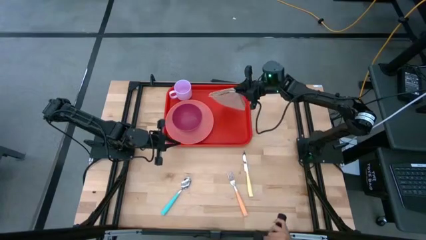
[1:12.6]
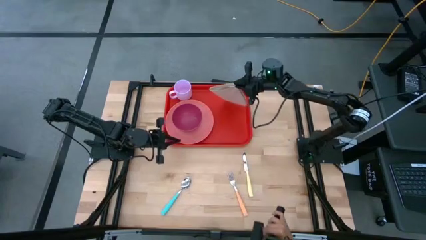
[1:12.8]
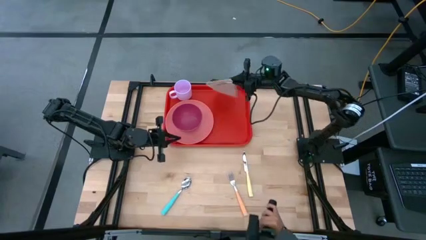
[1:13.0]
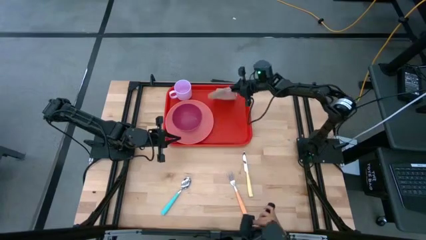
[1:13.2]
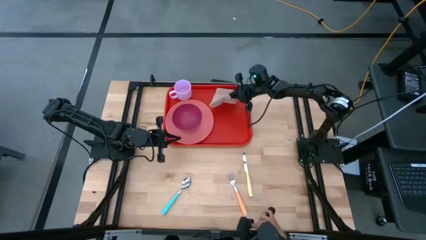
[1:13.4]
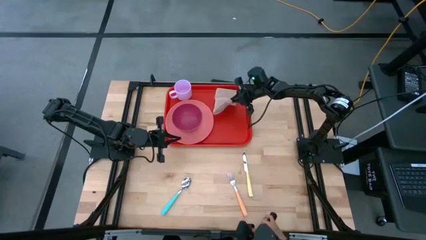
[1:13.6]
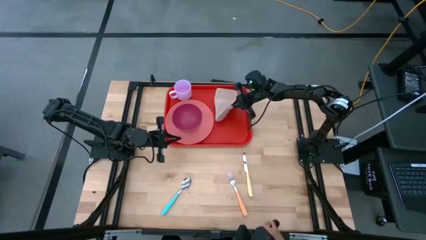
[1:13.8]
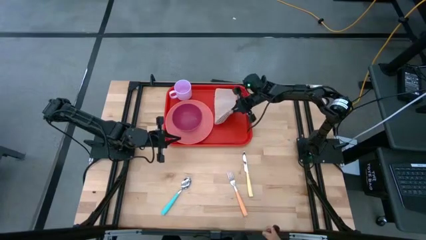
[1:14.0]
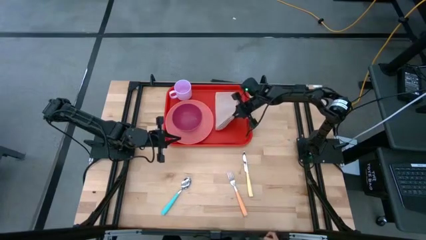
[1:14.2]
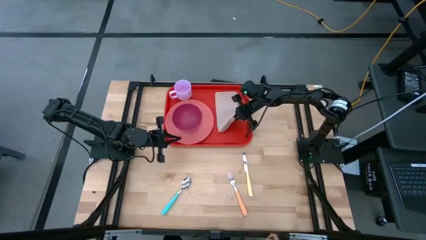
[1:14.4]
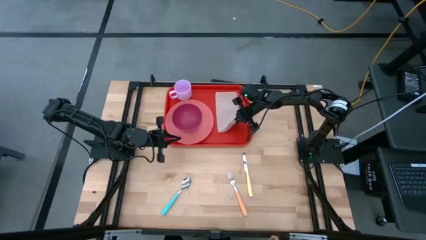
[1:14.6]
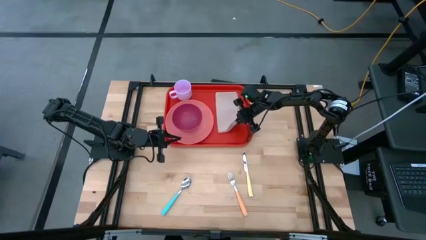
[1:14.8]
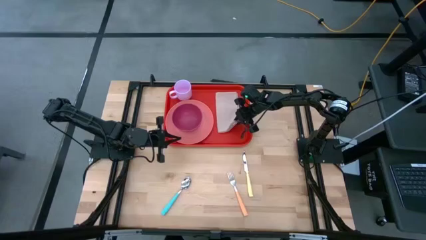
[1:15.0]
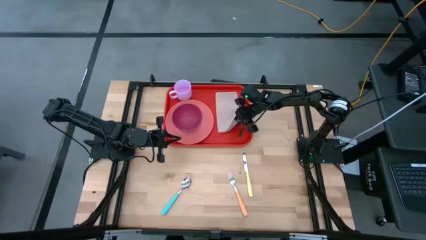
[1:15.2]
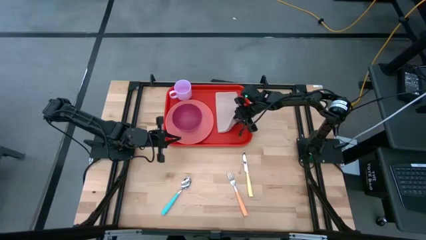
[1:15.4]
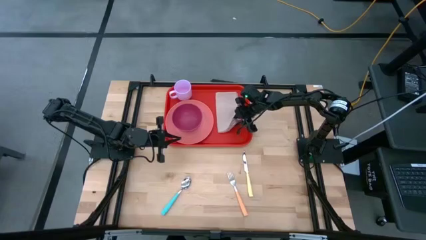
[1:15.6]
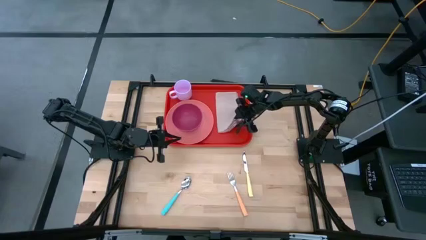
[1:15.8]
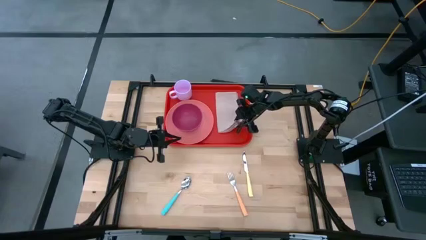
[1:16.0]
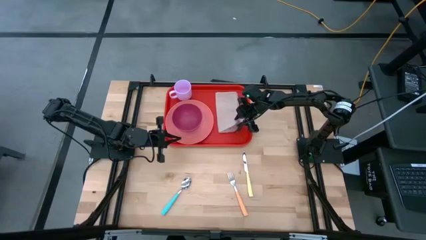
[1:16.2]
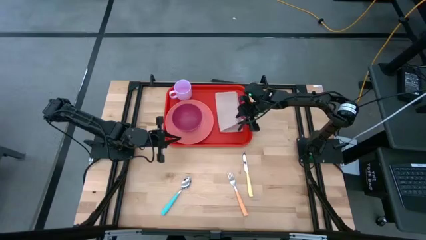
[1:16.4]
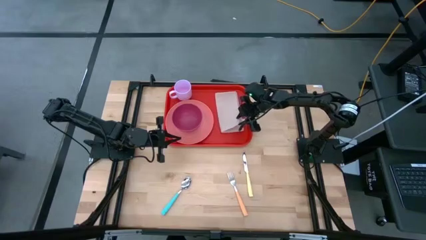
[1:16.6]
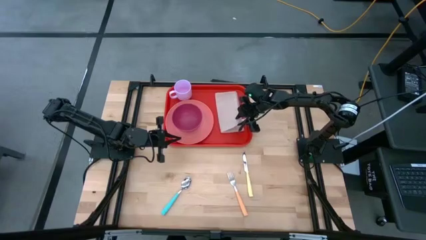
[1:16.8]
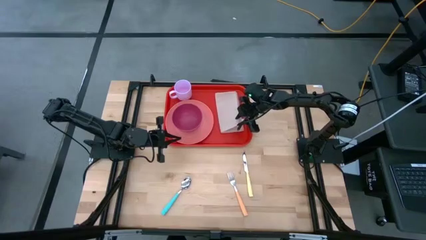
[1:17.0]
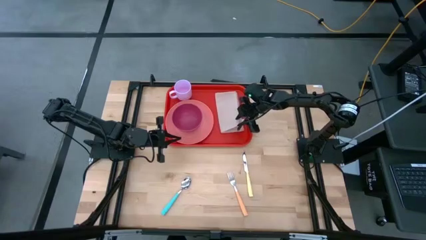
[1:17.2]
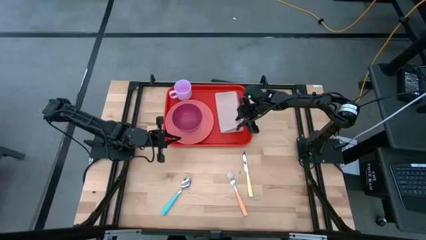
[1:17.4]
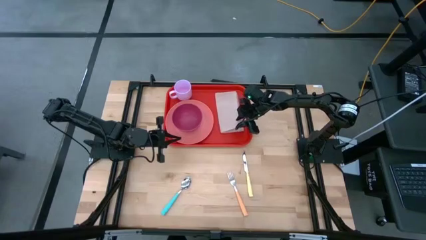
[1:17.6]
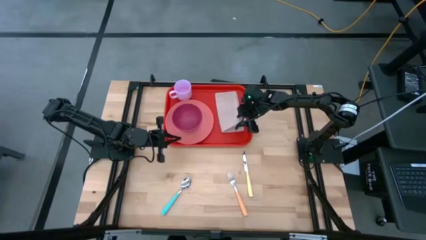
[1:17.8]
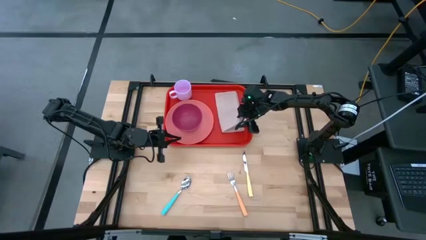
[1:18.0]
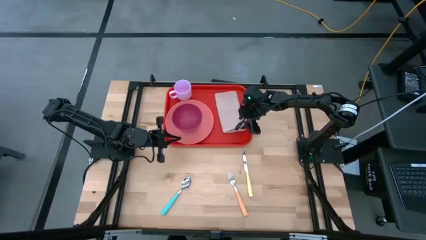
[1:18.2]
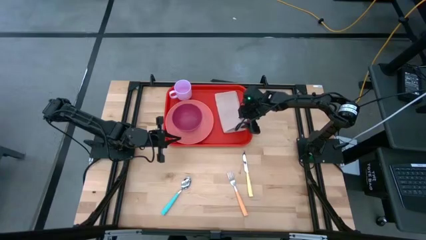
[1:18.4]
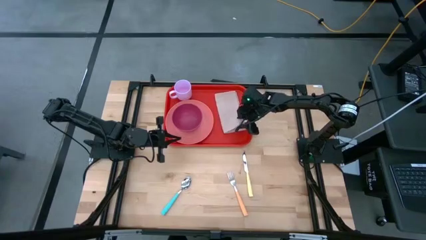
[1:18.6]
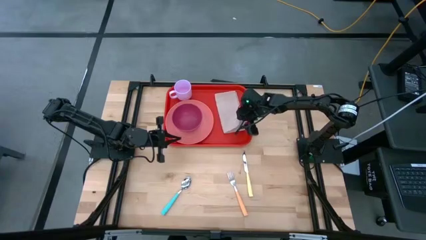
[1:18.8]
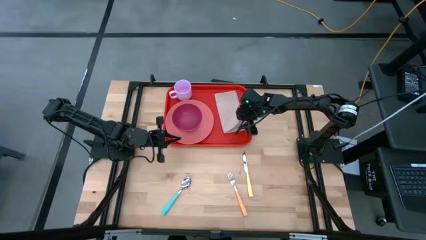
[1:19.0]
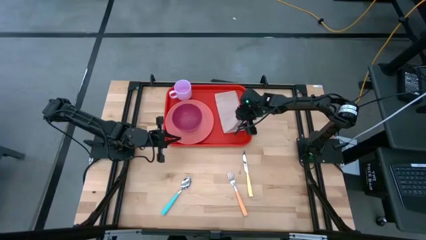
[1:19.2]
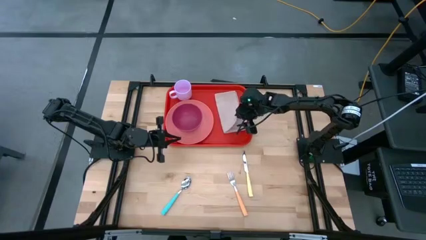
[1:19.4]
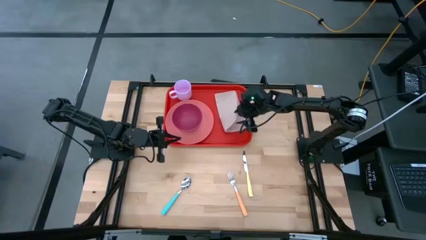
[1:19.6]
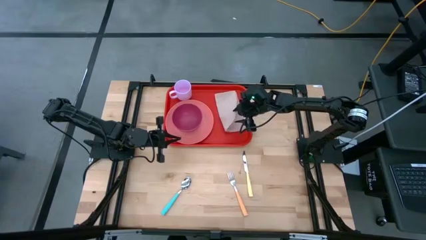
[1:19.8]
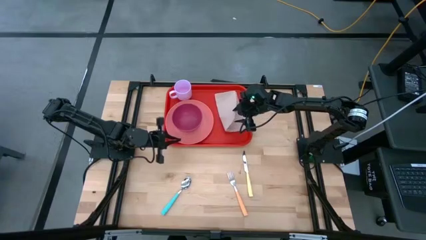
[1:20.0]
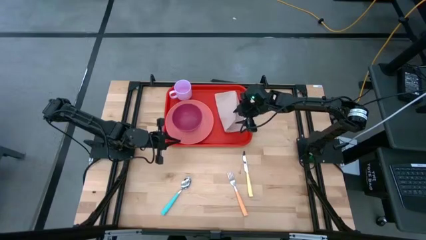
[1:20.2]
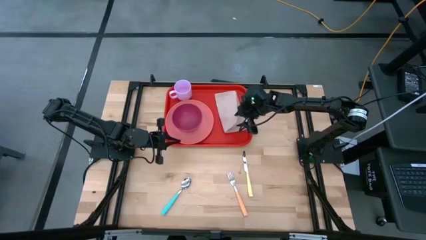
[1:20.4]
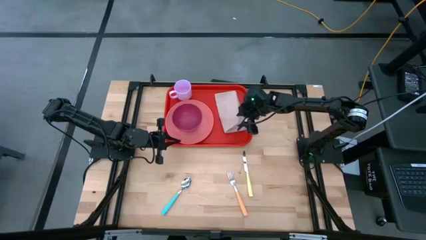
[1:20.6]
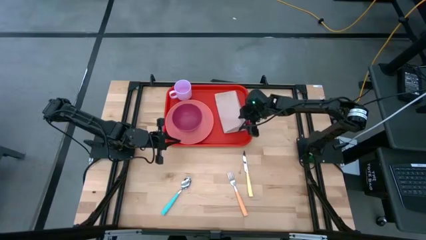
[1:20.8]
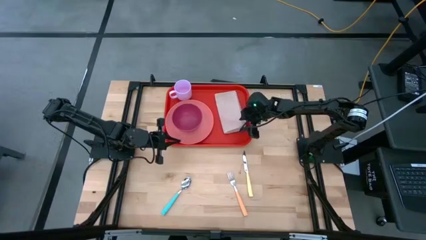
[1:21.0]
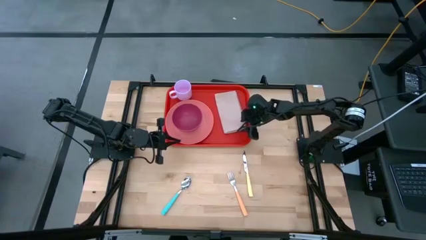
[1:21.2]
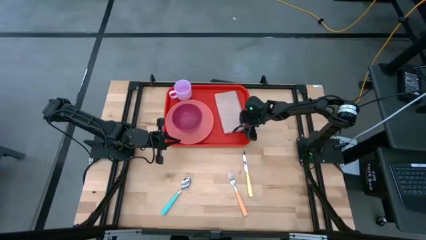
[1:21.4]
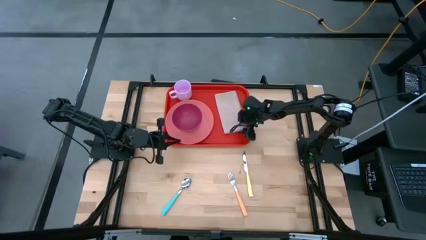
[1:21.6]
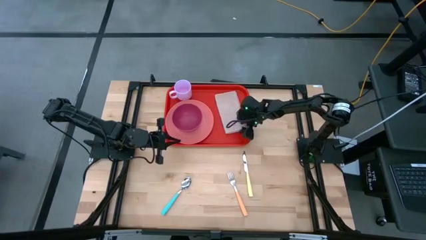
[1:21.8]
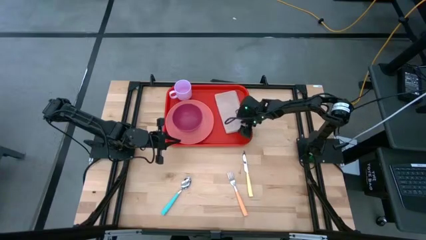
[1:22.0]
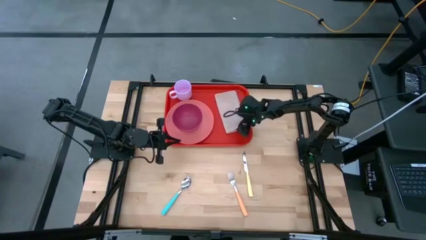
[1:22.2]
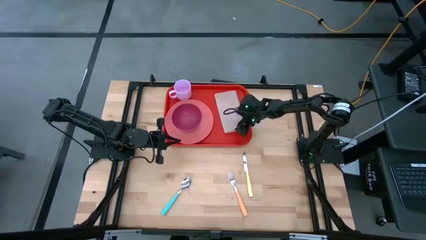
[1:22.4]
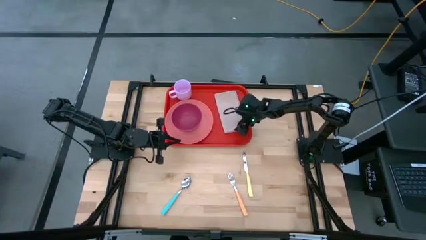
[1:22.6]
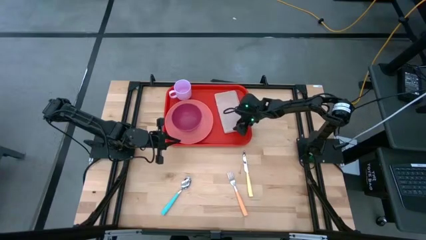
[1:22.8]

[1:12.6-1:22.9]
Task: Set up tray
Put the white table napkin on top of the orange serving tray to the right of the light orange plate

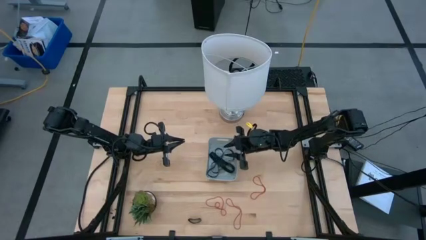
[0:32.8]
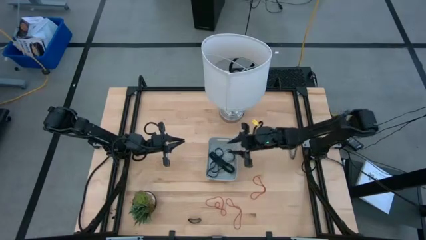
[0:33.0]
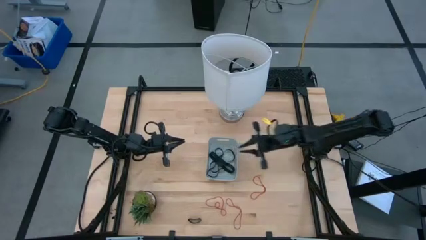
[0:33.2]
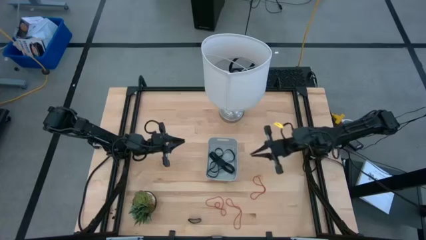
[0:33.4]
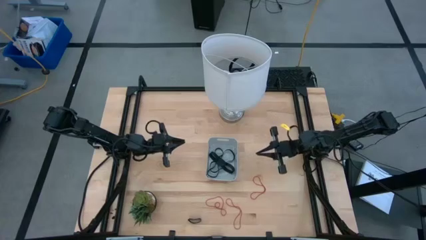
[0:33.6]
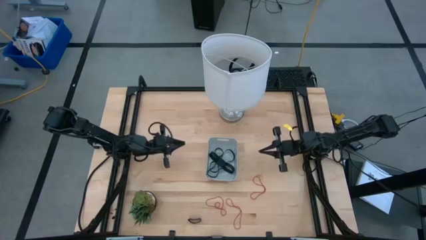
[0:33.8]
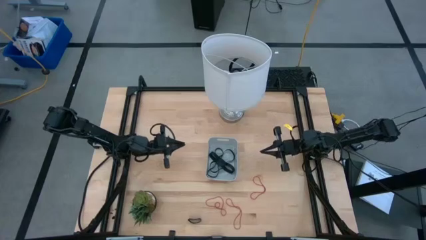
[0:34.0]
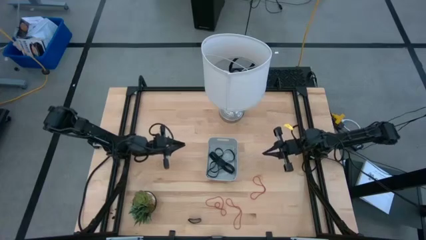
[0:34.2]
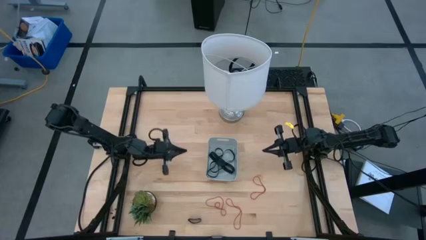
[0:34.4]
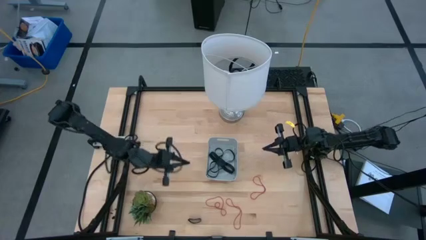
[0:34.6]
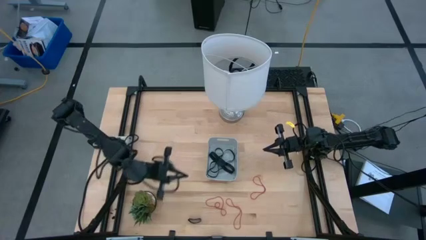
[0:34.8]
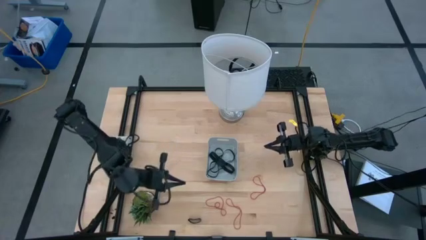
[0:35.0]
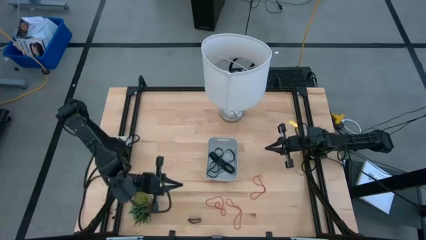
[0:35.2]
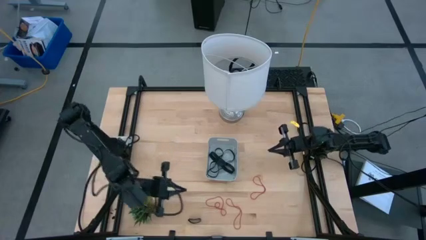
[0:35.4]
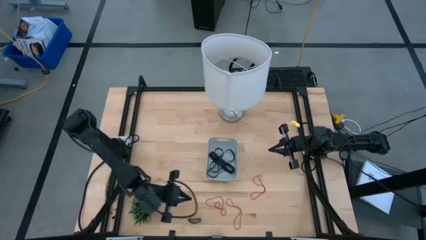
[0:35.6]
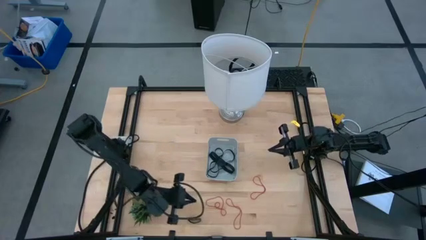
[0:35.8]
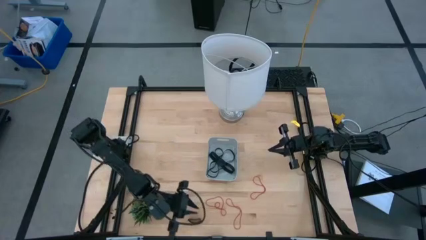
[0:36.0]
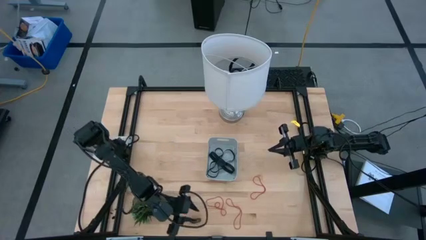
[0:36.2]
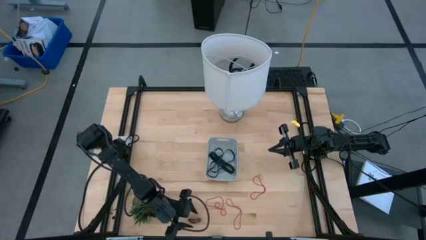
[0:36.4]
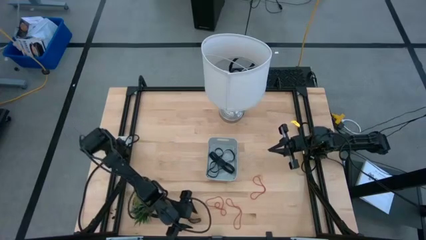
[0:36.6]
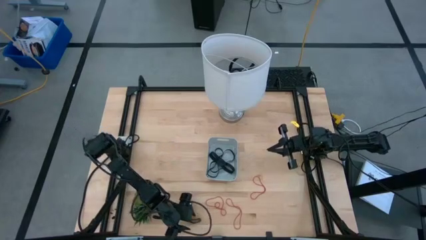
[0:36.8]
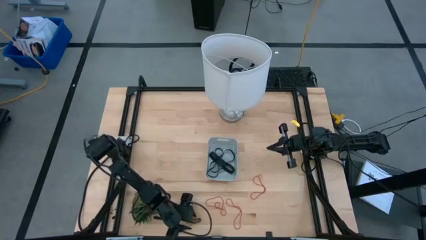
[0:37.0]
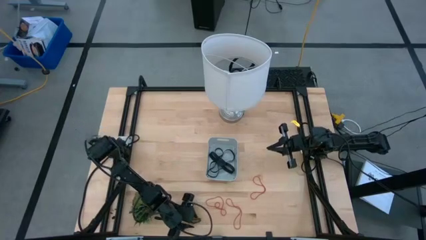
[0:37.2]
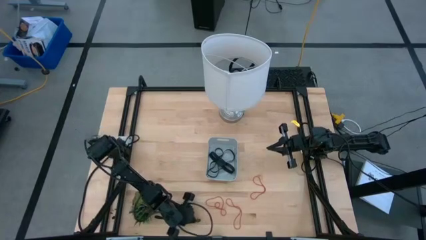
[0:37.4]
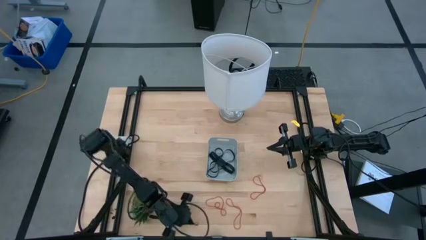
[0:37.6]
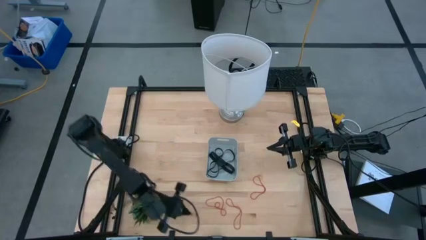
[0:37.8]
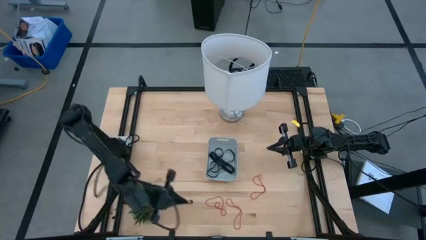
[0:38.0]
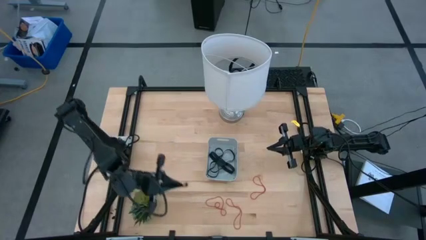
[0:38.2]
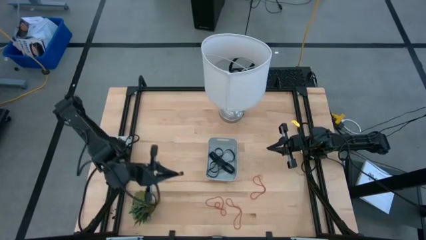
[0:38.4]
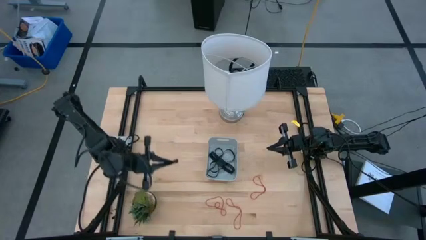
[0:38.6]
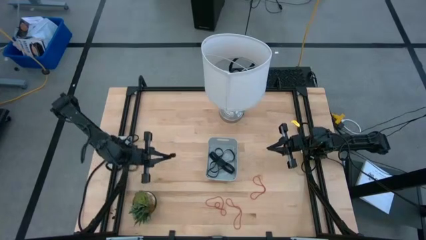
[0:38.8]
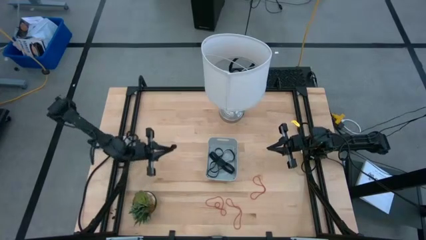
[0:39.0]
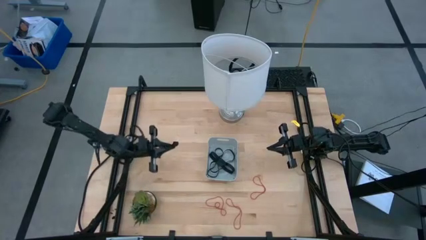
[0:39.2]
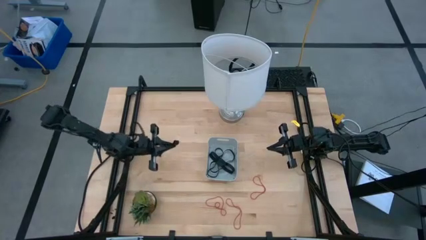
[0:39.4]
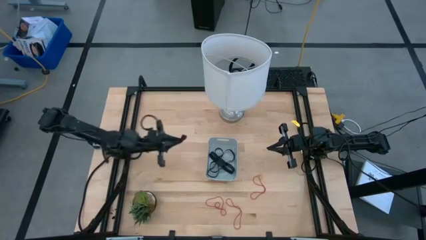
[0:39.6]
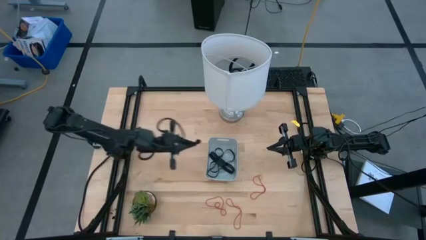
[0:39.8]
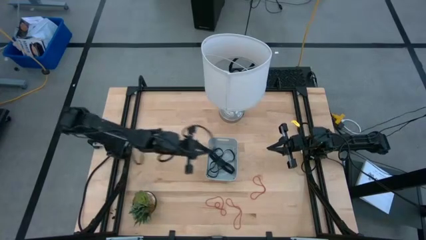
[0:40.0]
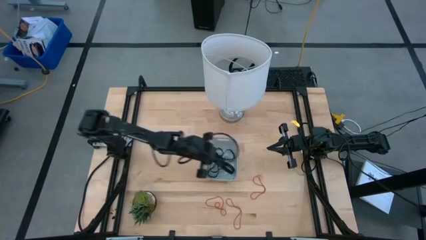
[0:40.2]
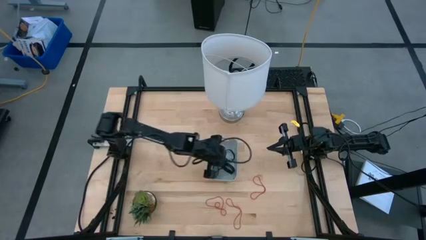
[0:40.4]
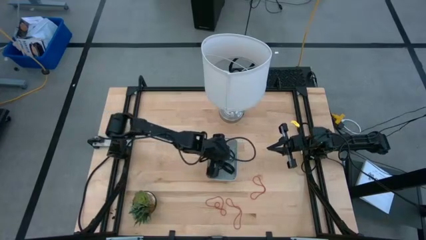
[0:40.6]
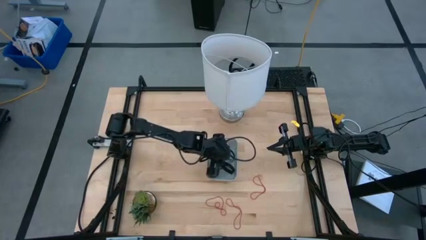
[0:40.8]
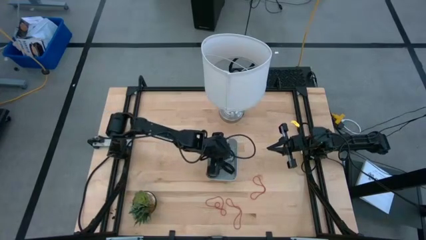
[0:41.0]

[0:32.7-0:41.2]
Task: Pick and place rubber bands into bin
Put the black rubber band into the gray bin
